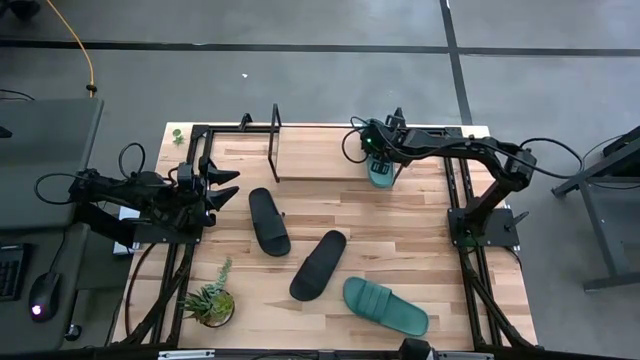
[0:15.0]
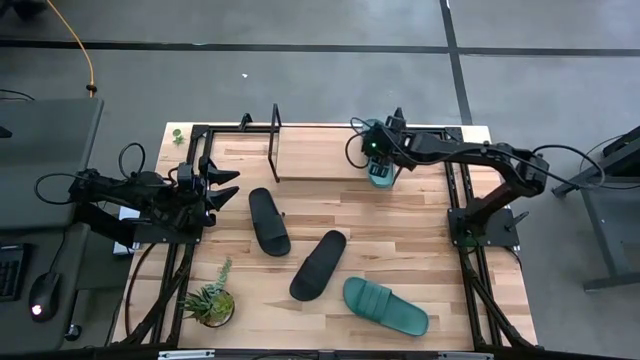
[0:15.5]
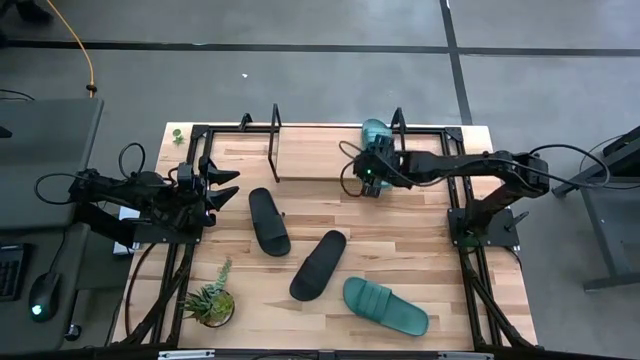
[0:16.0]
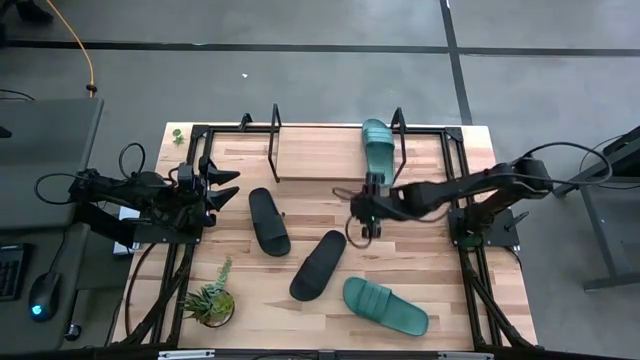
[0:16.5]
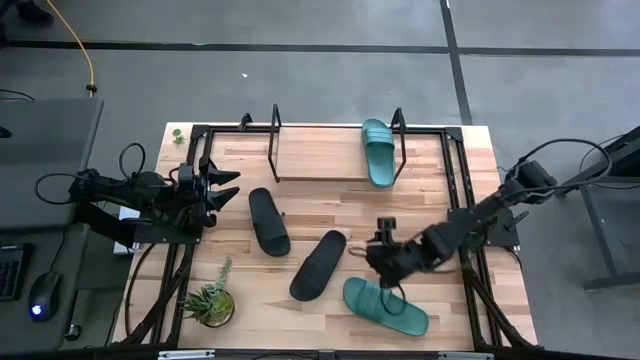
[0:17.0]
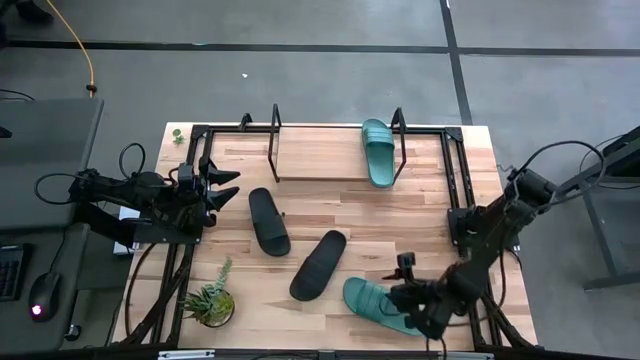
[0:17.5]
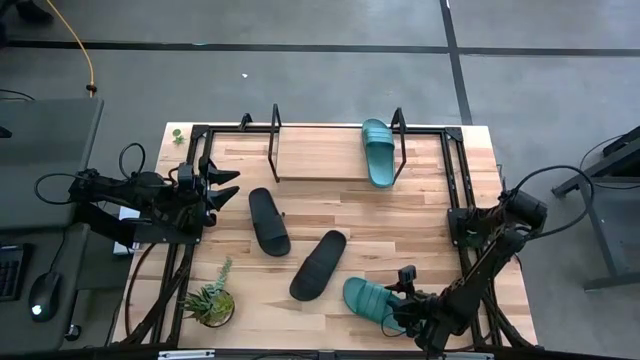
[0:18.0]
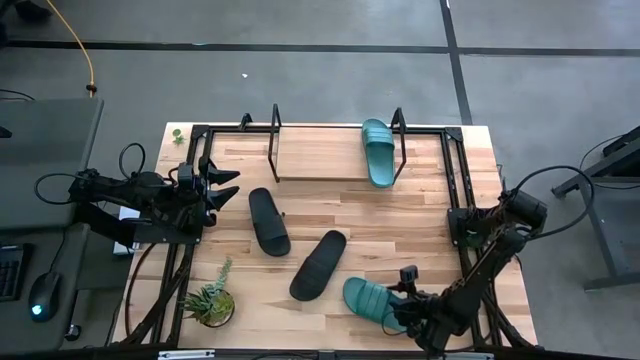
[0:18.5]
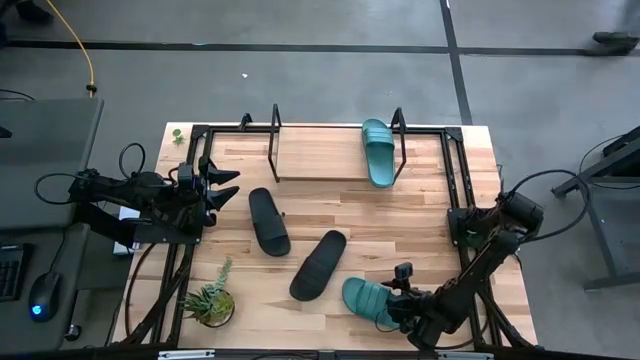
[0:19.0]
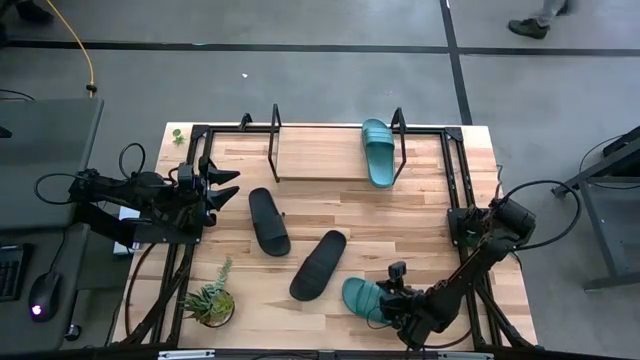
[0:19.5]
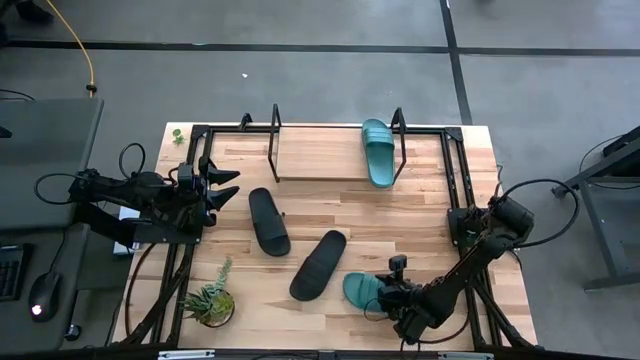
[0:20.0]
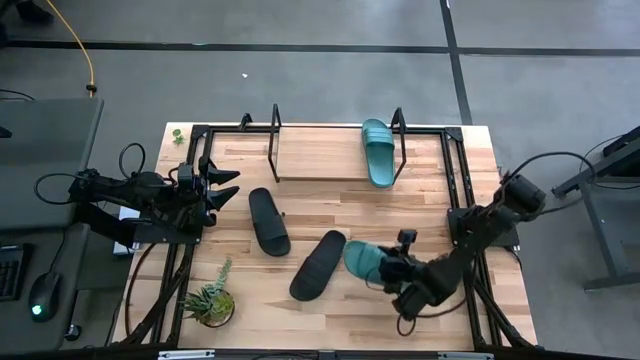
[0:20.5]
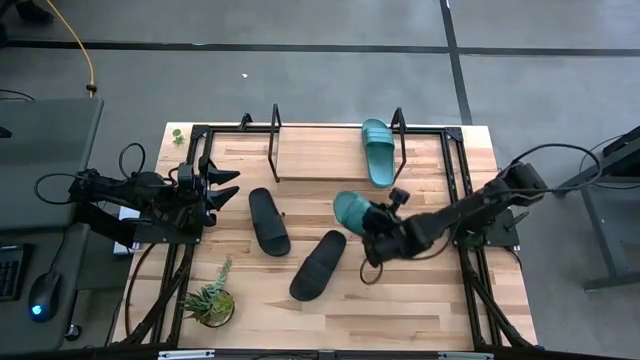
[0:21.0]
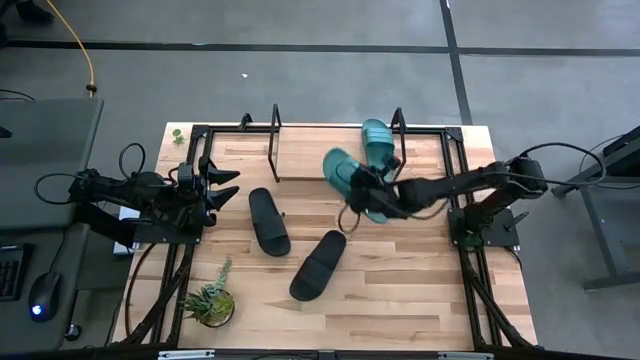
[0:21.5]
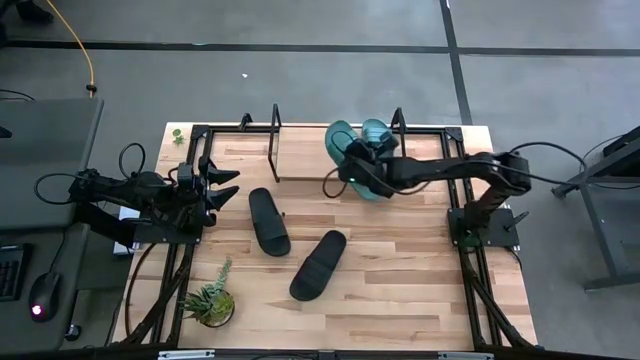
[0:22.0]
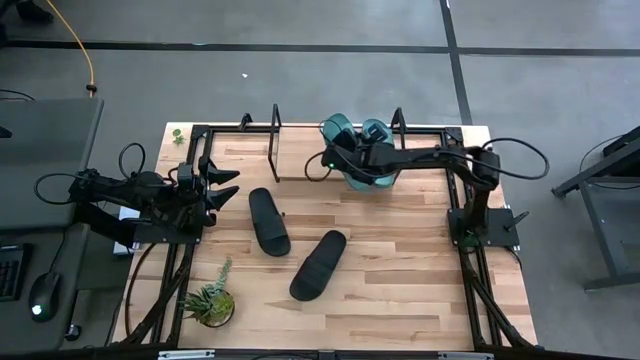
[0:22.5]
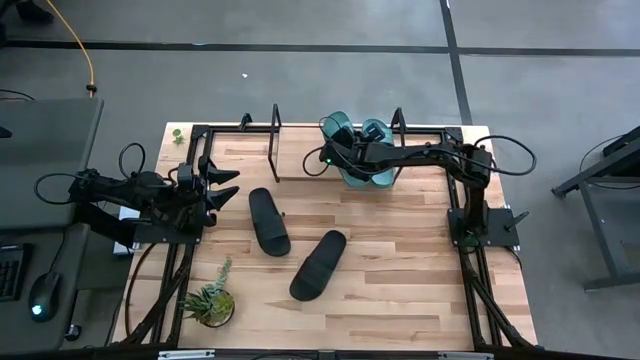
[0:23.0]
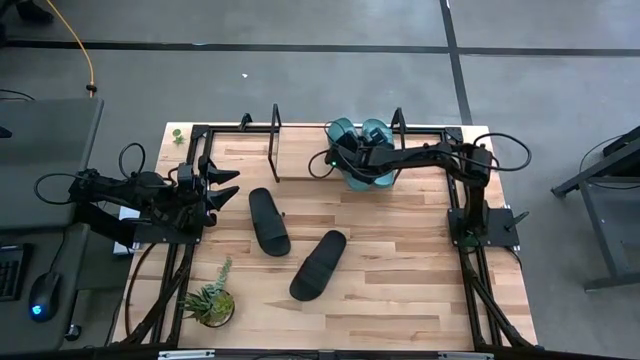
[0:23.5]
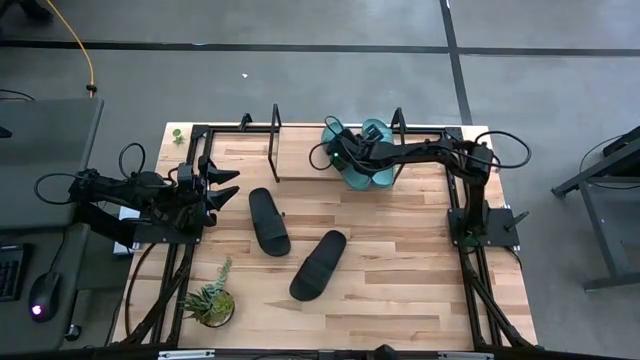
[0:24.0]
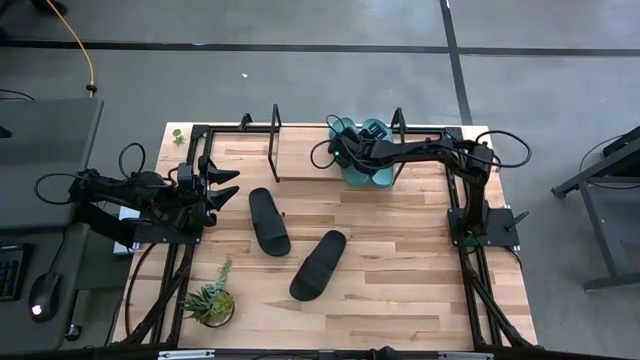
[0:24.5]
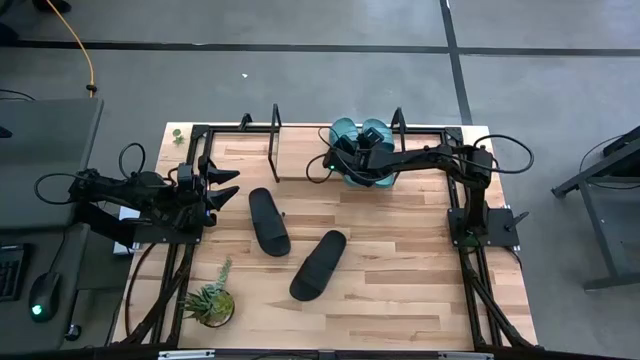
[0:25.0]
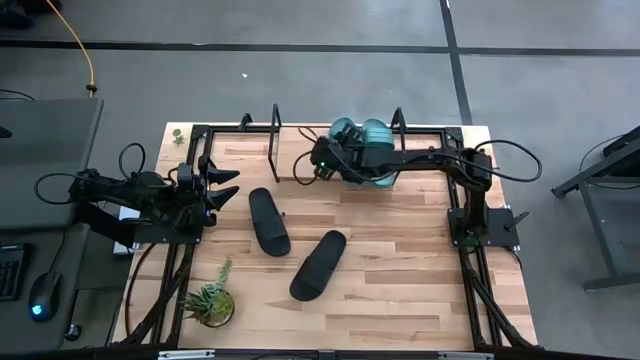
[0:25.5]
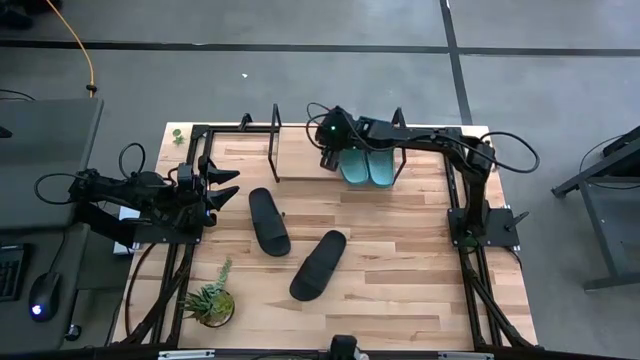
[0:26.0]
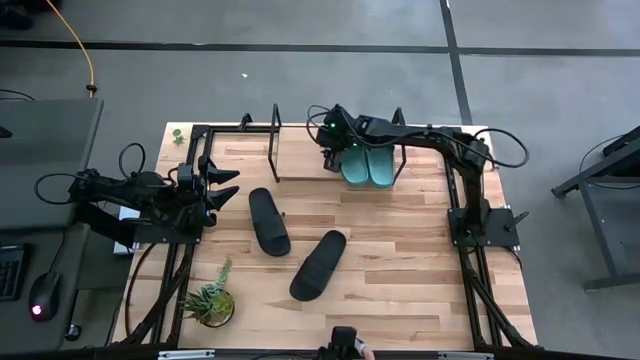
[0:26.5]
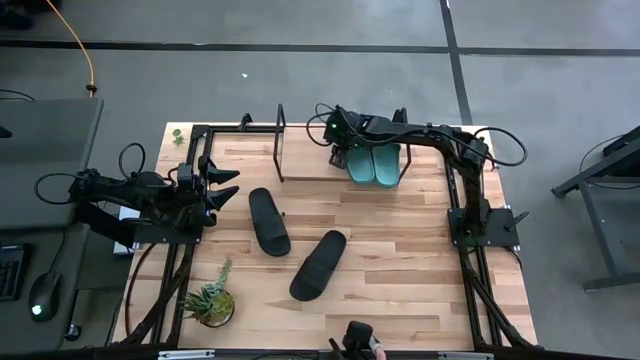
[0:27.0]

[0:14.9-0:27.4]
Task: Pick and place slides into the shelf
Put the green slide on the shelf

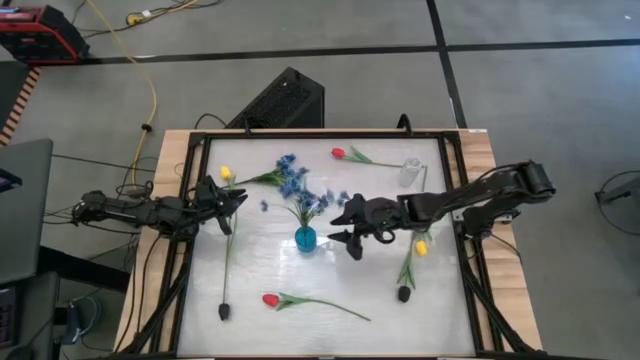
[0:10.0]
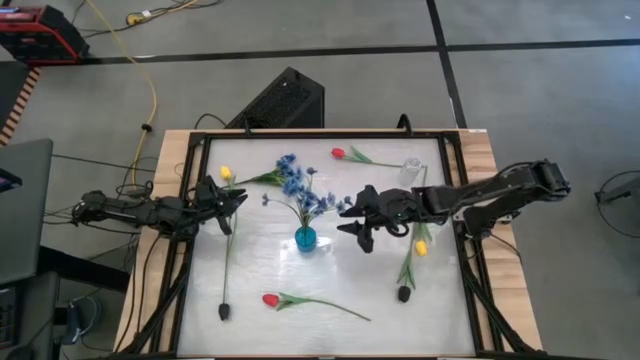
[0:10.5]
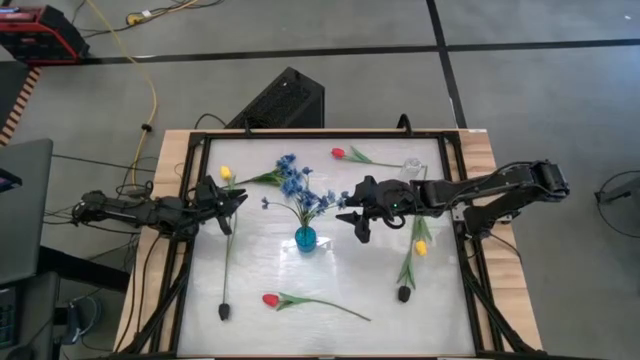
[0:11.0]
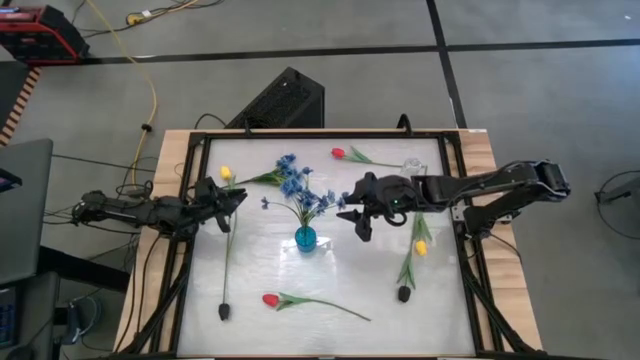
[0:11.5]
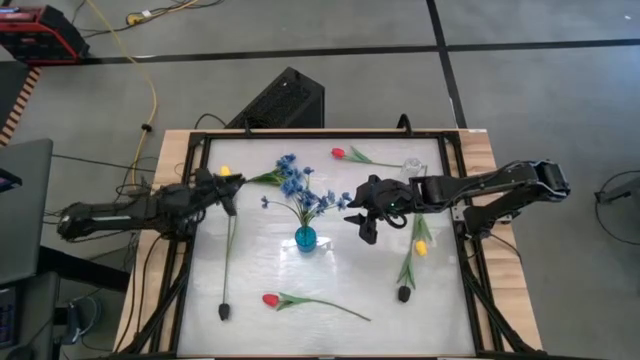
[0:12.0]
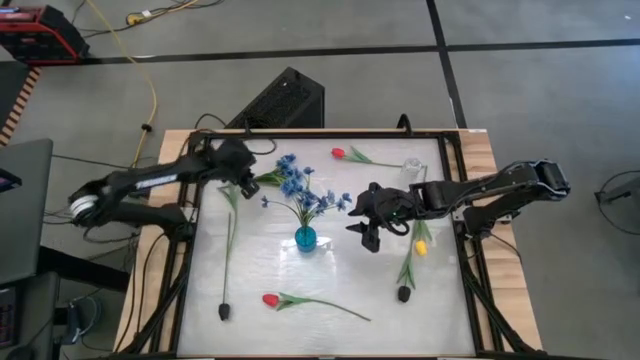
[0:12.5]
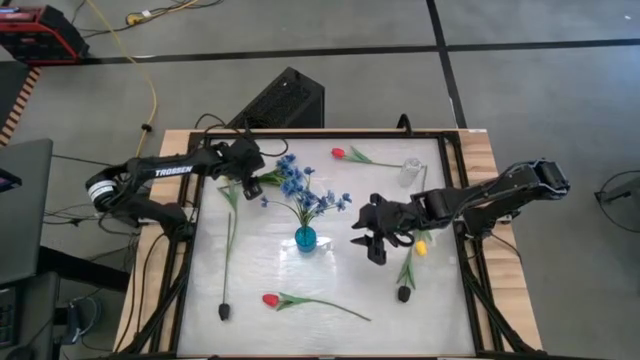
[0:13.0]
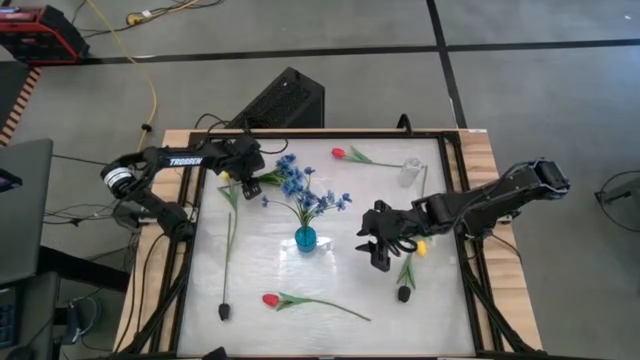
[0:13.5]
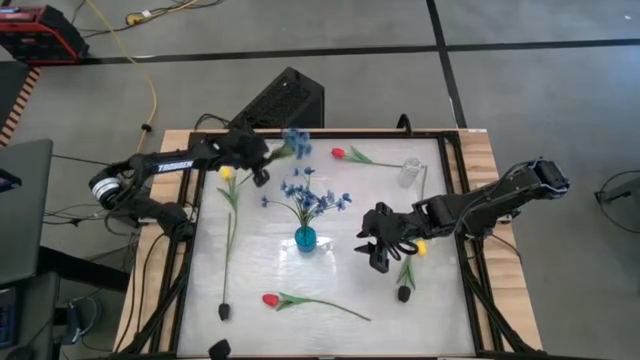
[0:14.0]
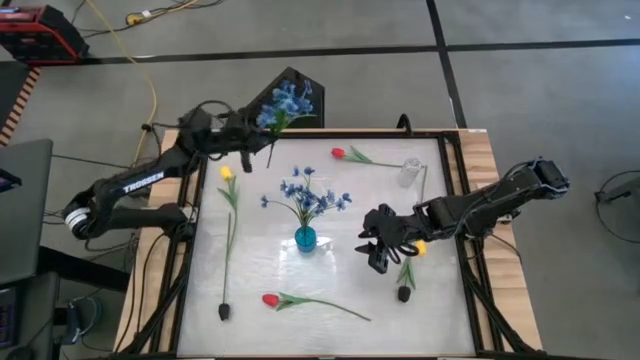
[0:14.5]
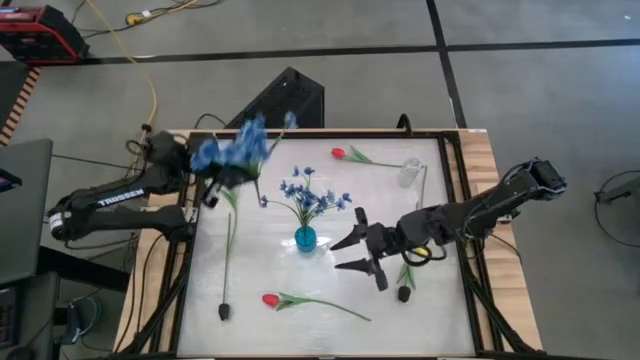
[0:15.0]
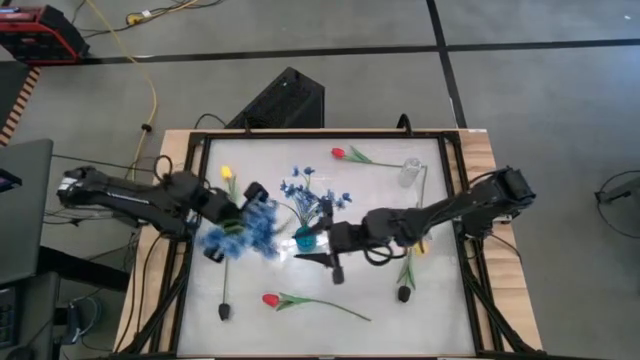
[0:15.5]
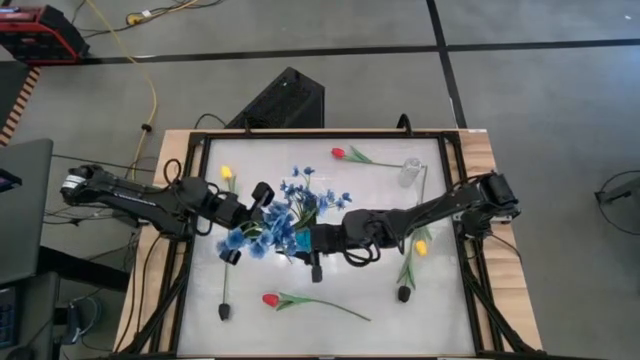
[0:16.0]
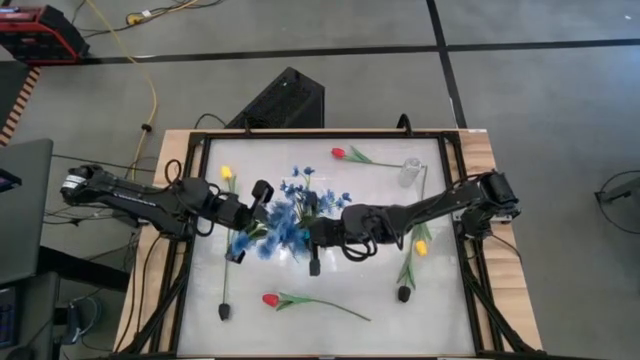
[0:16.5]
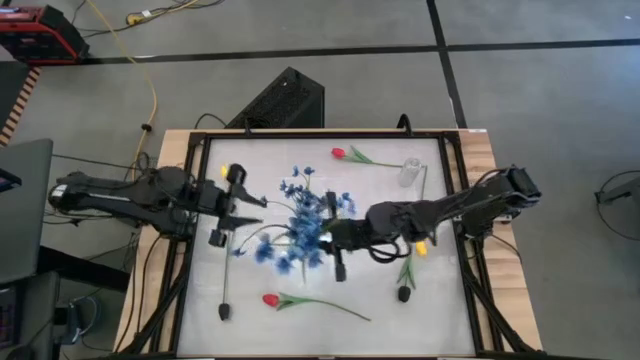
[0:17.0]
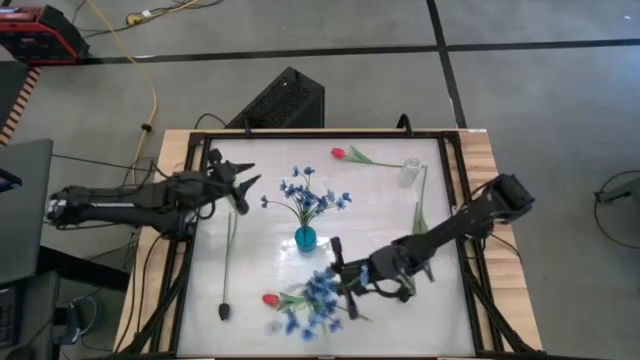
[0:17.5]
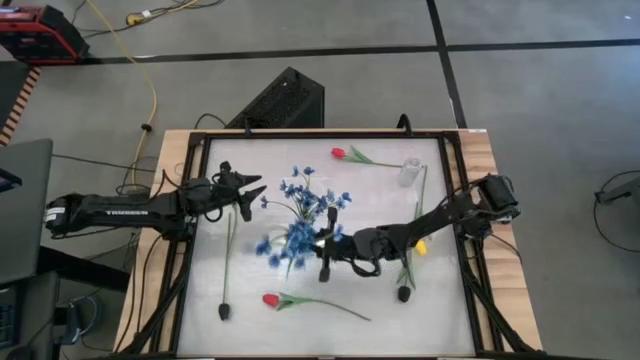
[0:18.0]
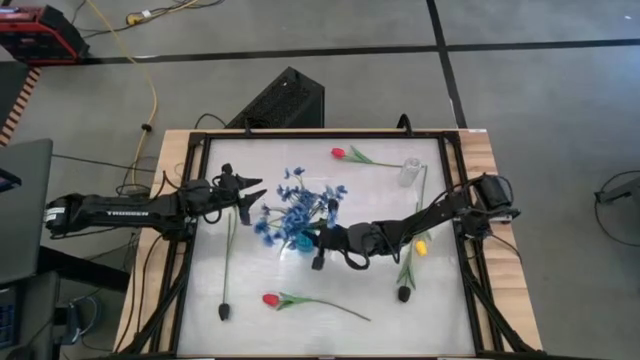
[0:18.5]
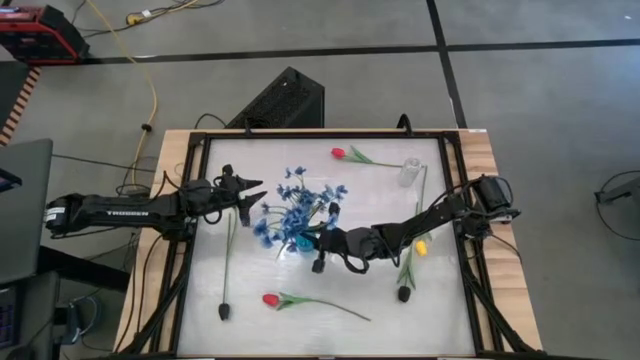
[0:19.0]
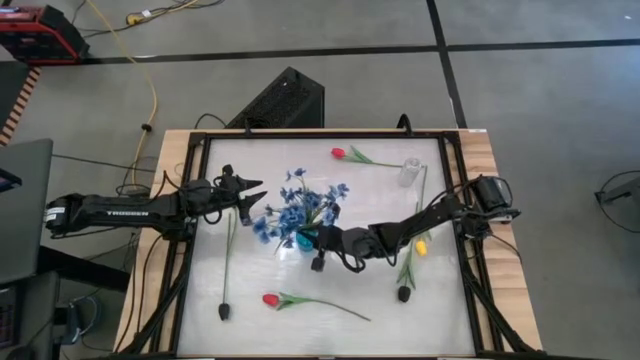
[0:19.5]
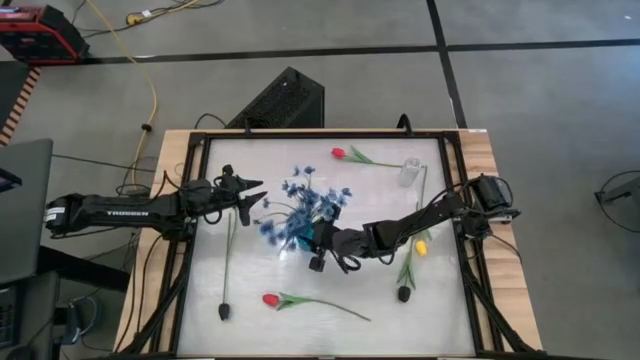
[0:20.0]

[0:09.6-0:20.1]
Task: Sort flowers into vase by color
Put the blue flowers into the blue vase
